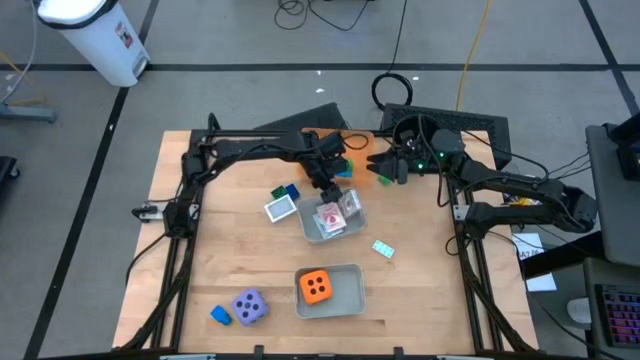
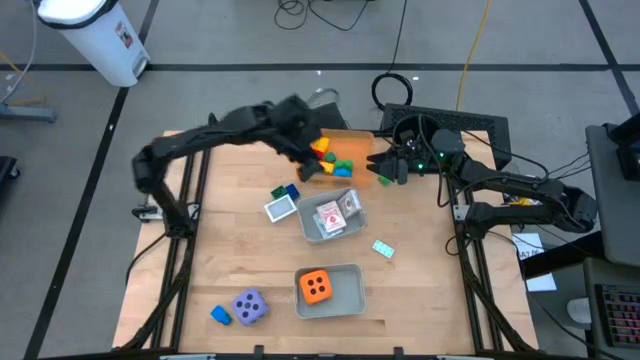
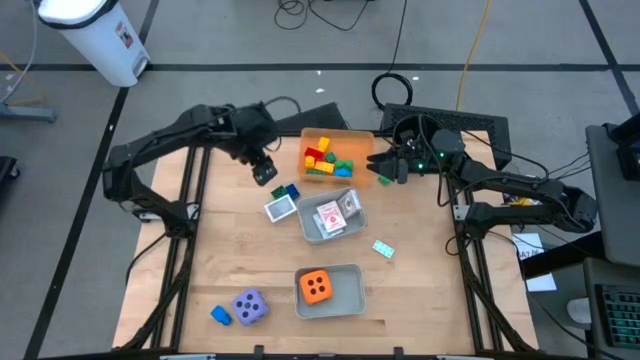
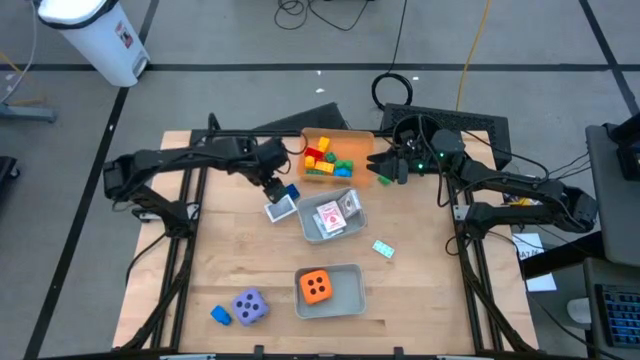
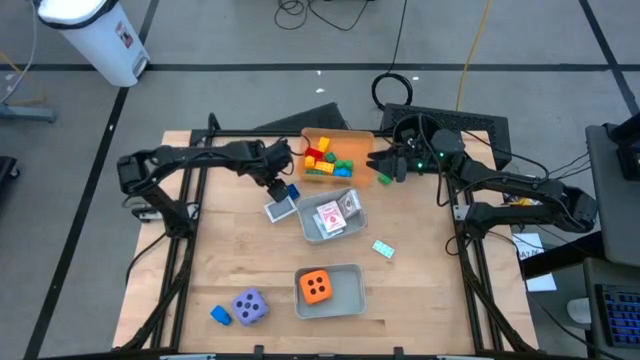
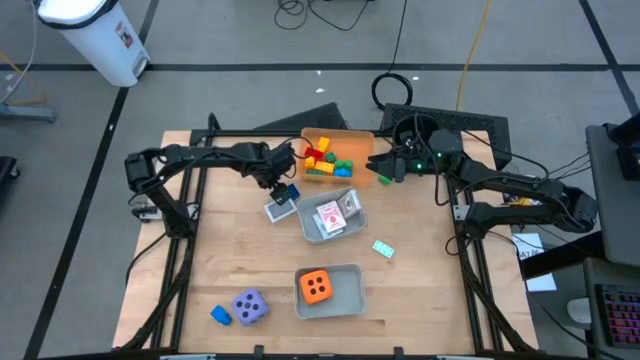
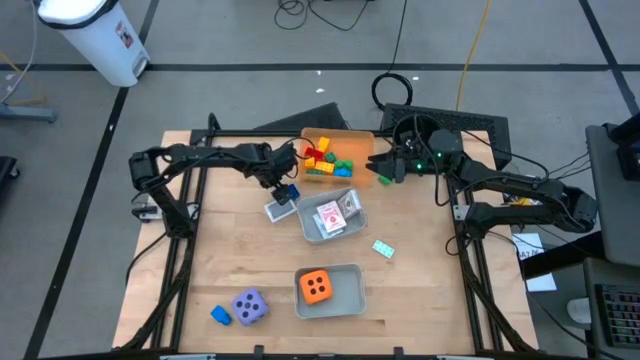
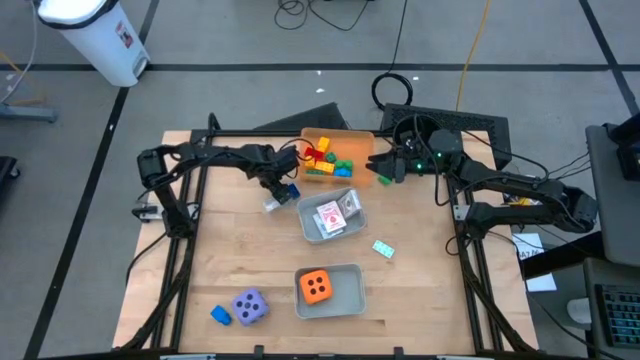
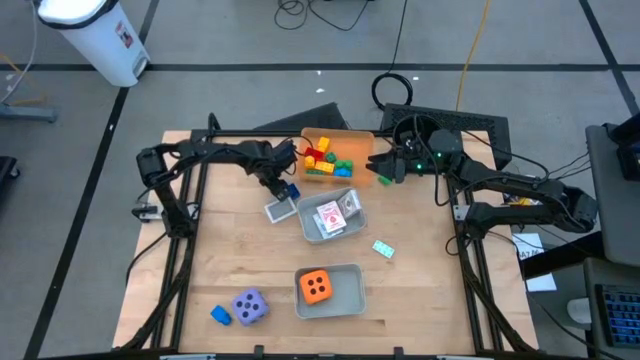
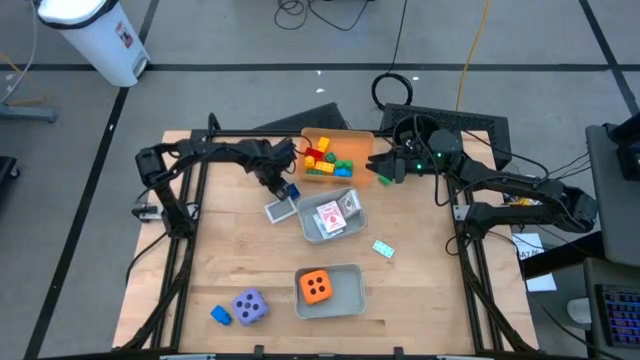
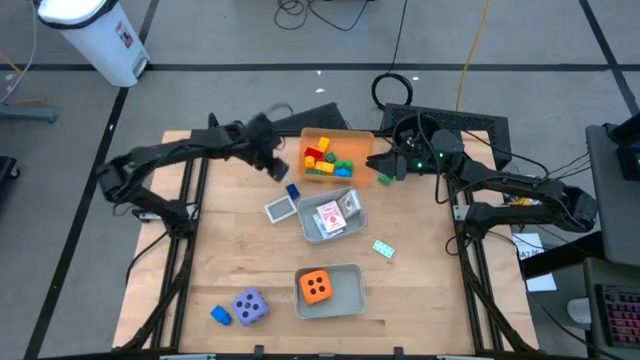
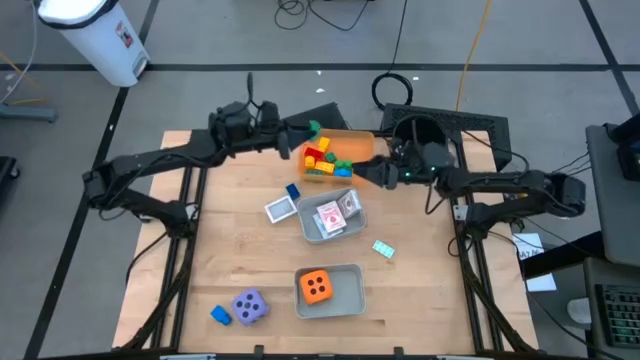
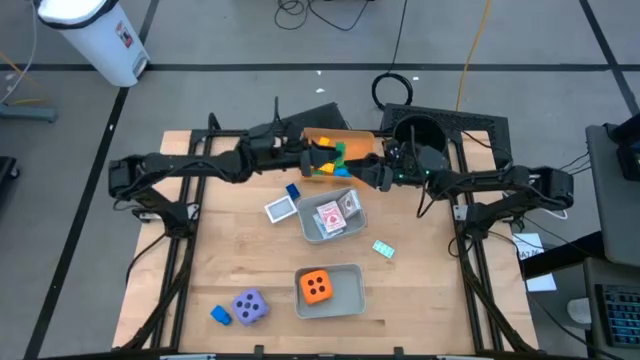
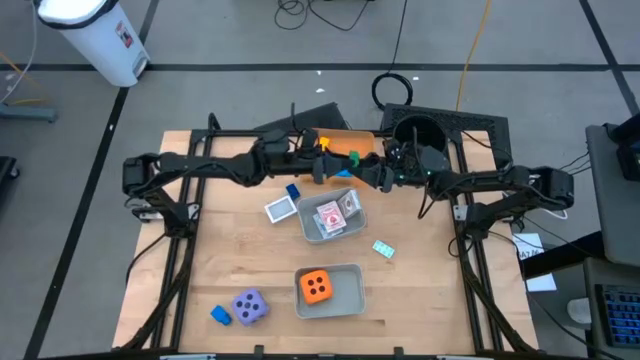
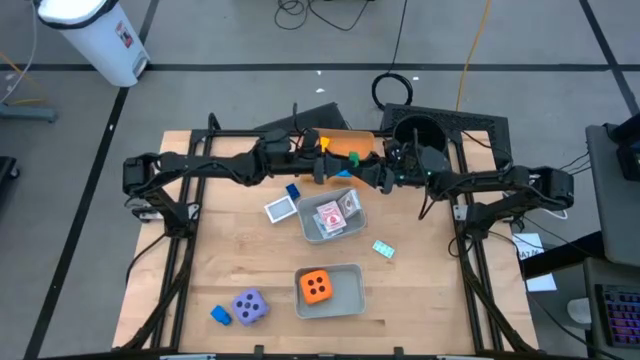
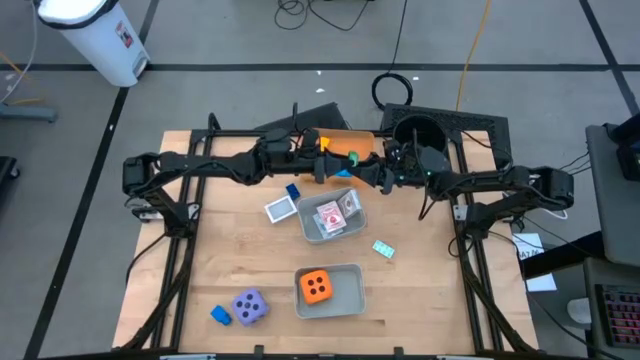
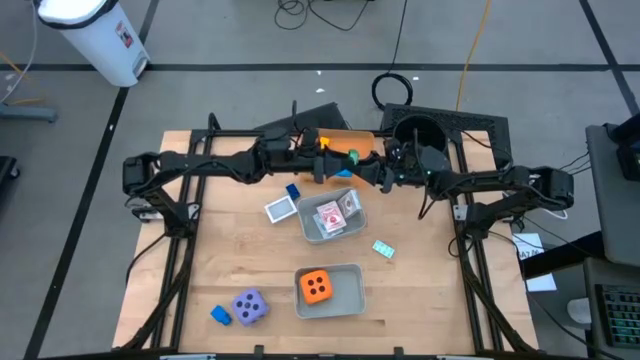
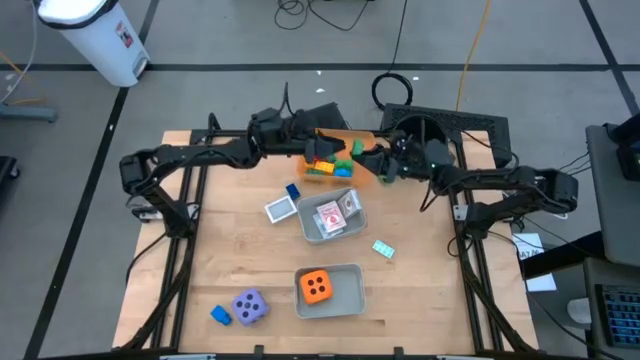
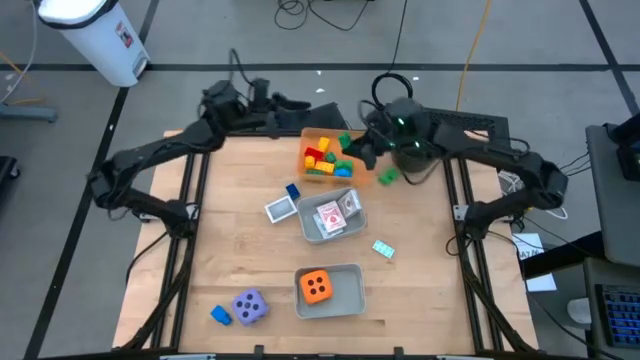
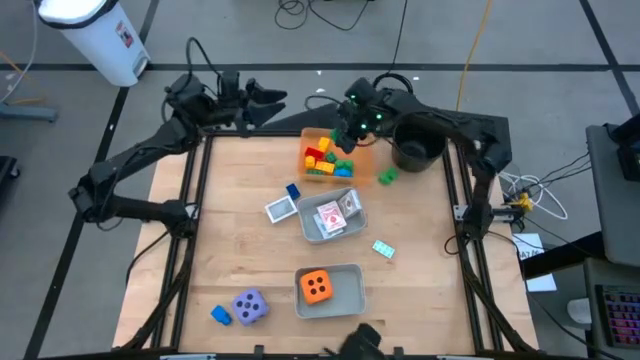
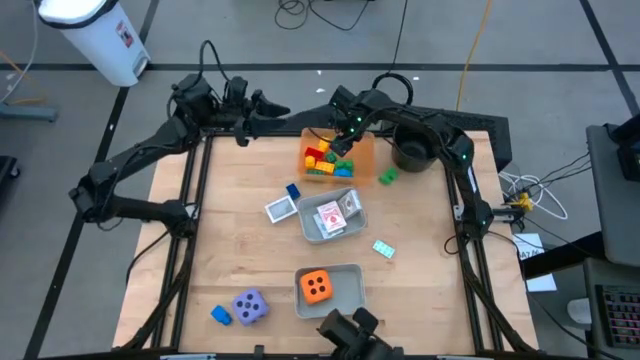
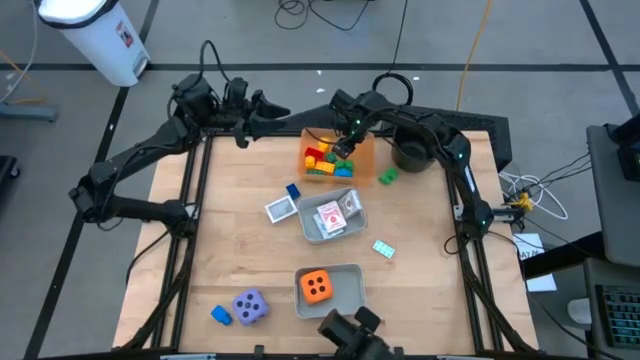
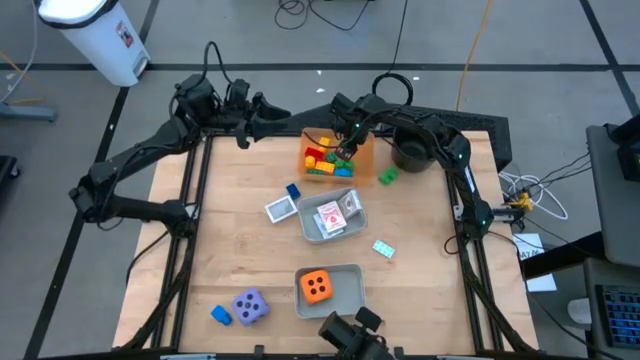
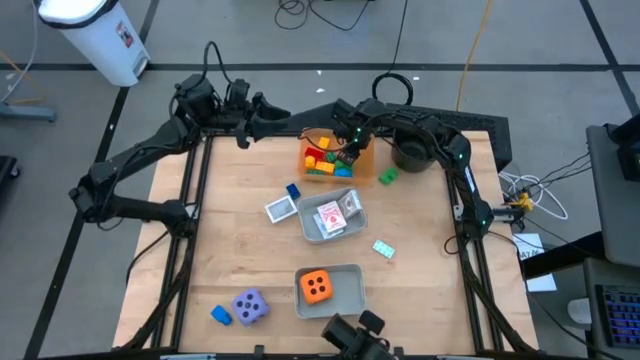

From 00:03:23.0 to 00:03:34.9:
Task: Pick & Place Toys
Put the green game piece into the orange bin

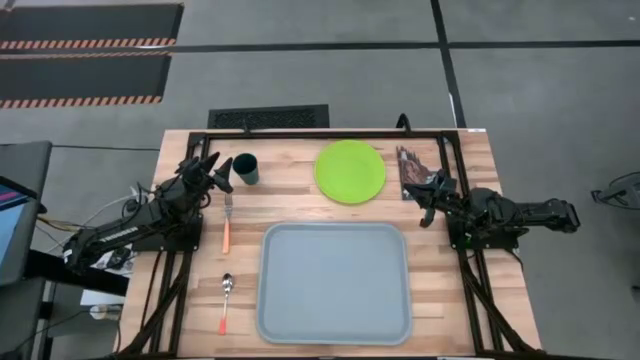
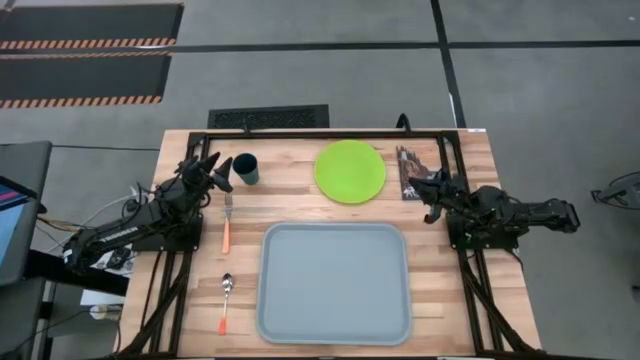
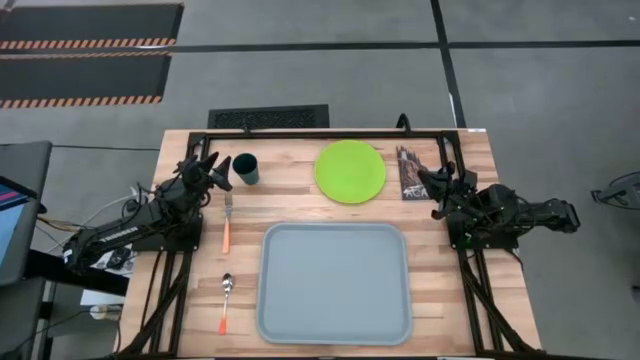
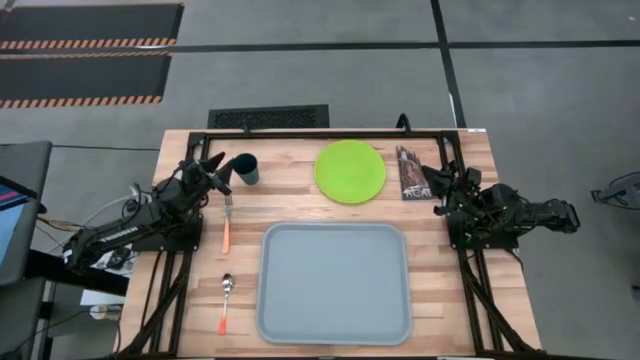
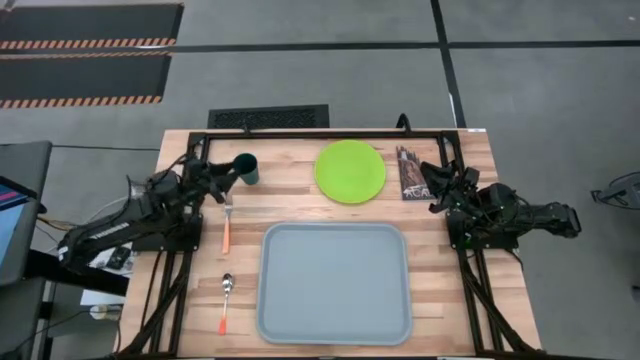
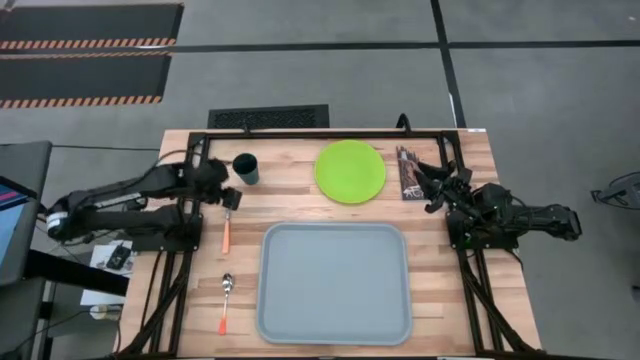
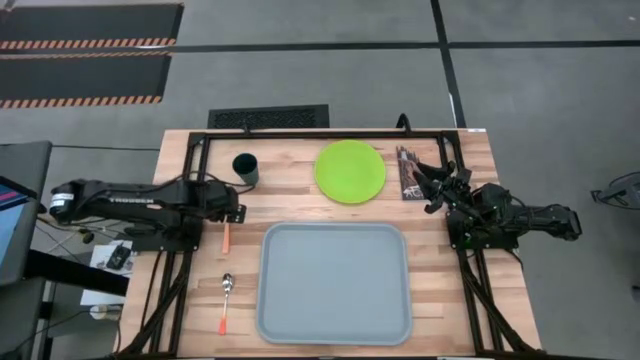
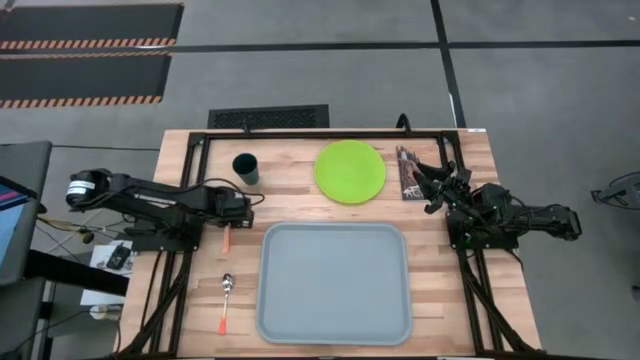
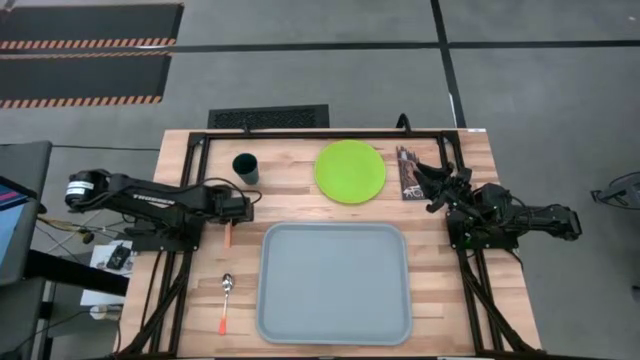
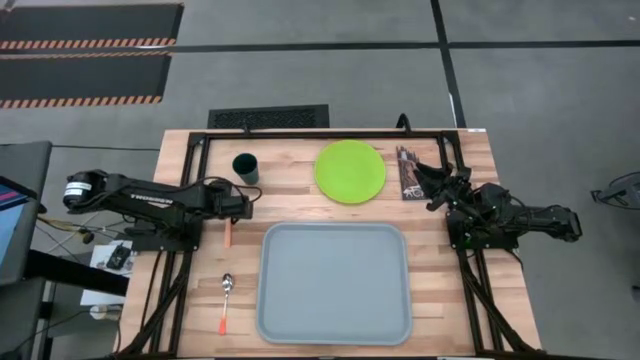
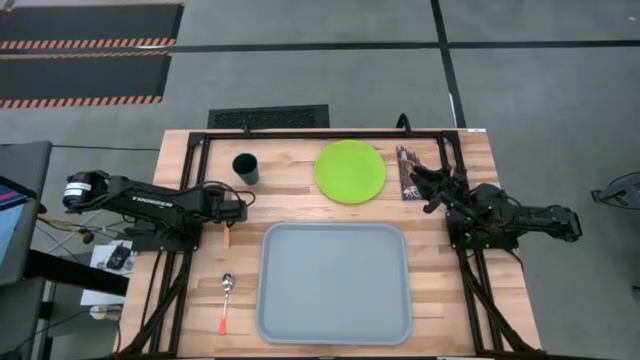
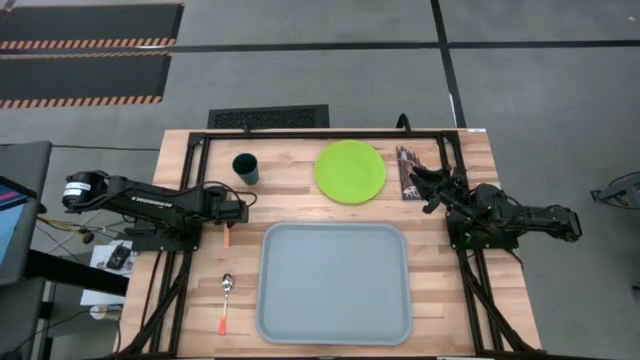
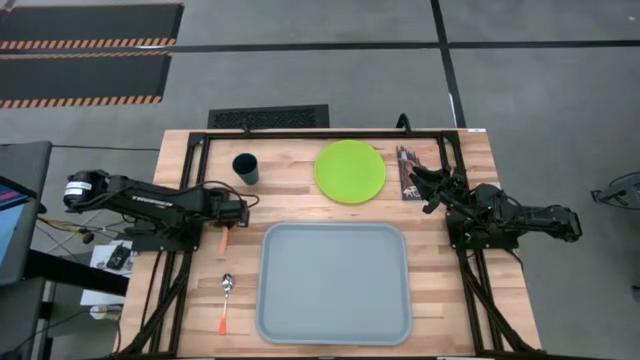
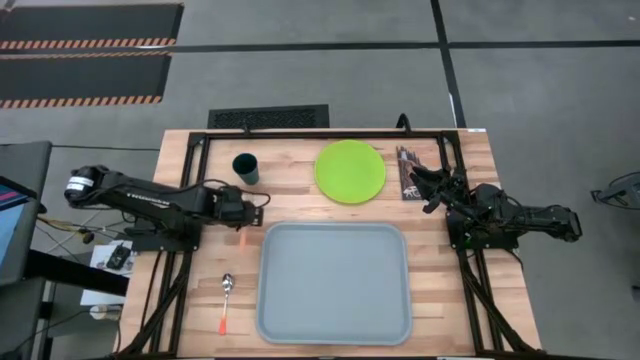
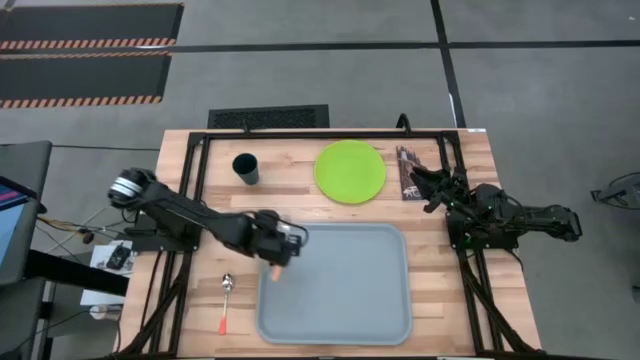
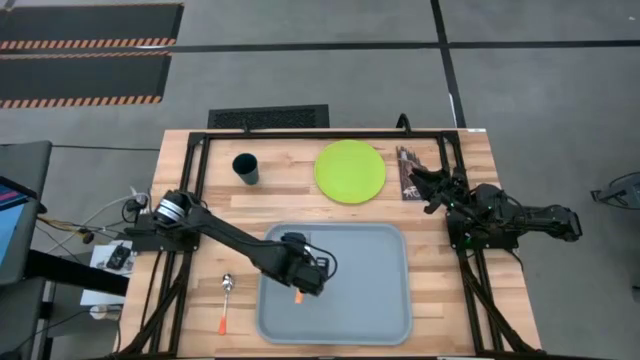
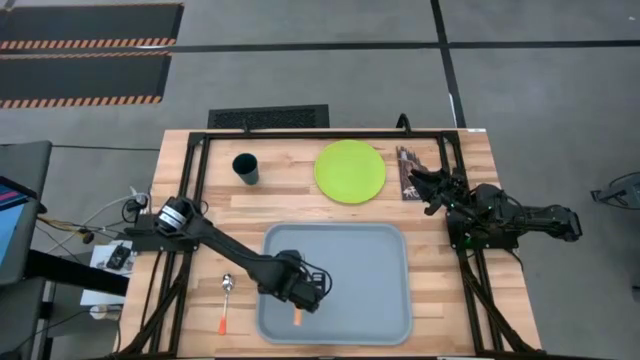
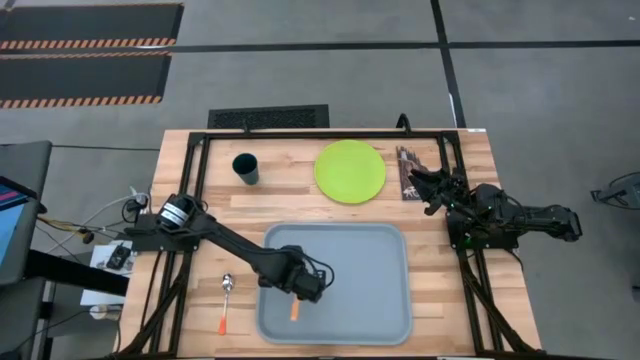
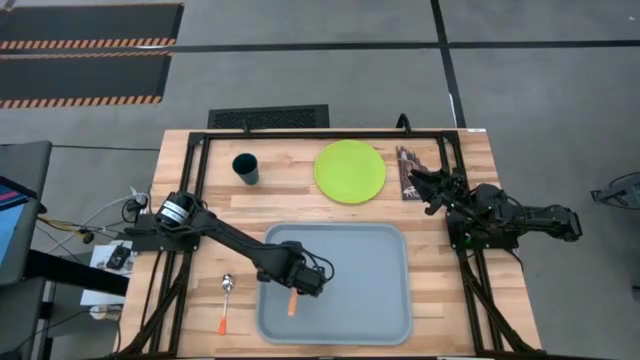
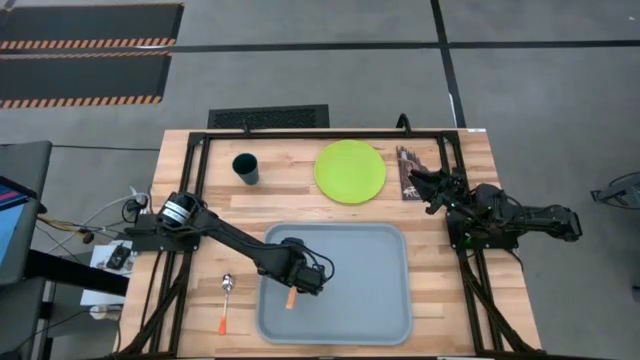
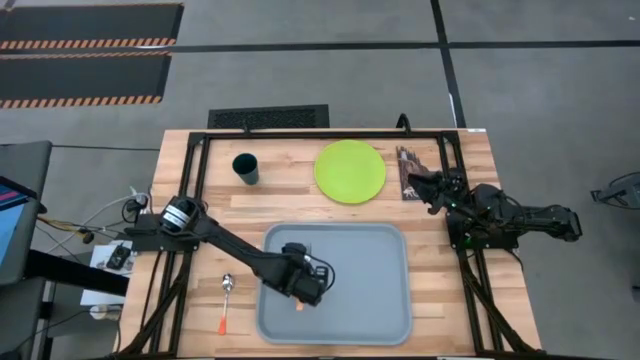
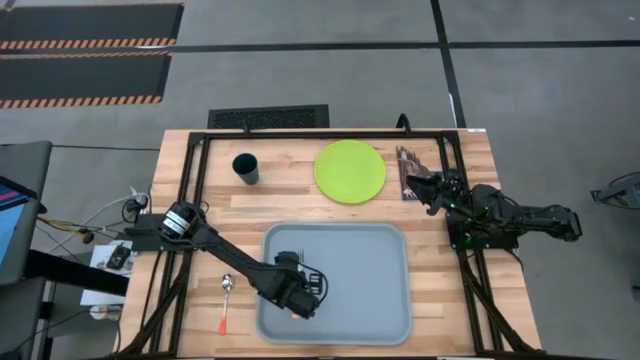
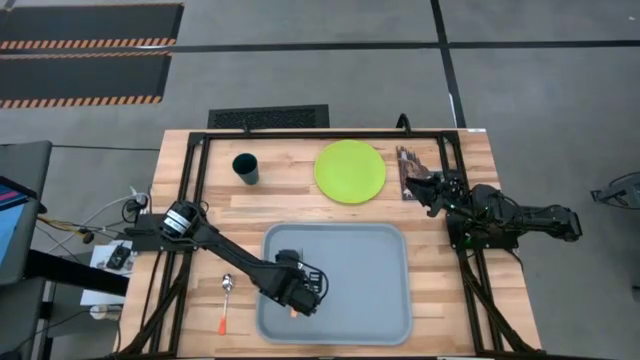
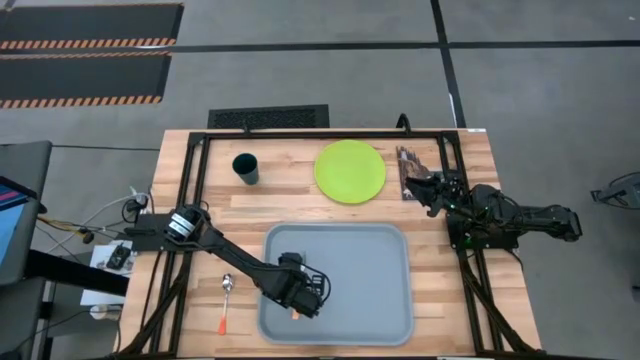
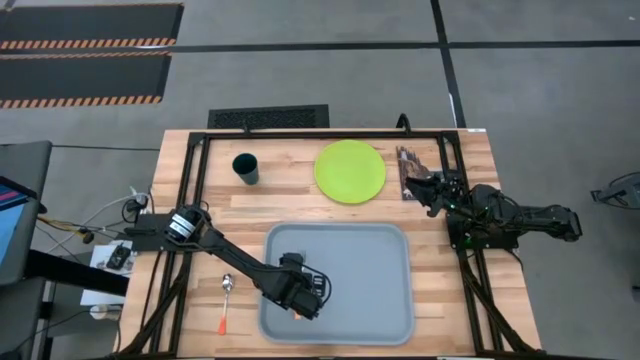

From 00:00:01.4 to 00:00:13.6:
Task: Pick and place plate/cup/fork/spoon on tray
Put the yellow fork on the gray tray
